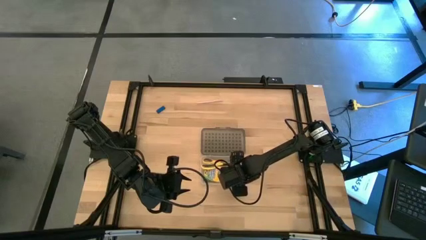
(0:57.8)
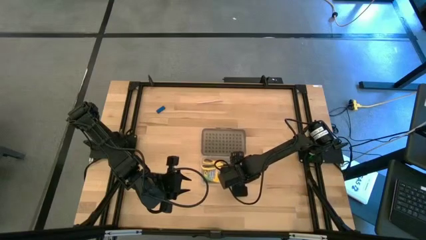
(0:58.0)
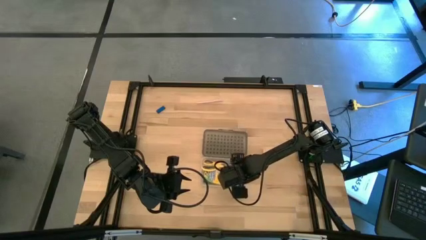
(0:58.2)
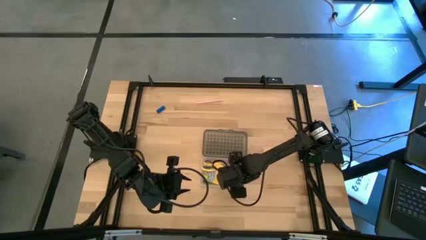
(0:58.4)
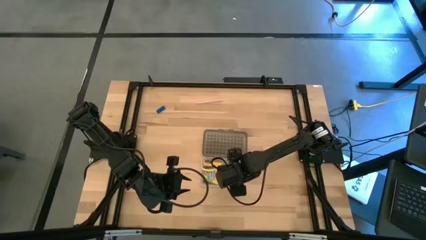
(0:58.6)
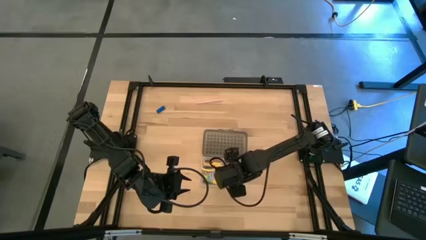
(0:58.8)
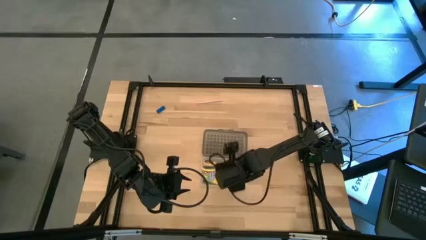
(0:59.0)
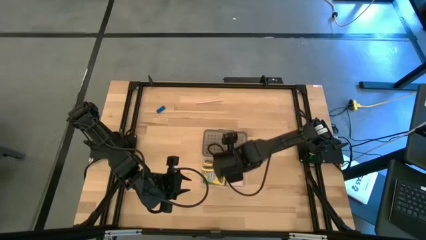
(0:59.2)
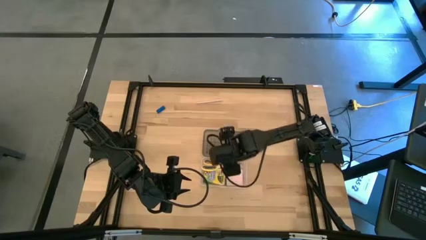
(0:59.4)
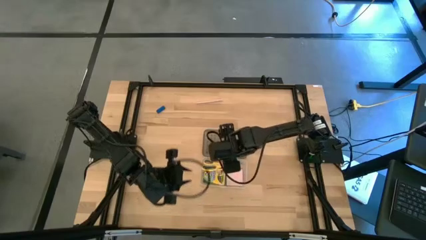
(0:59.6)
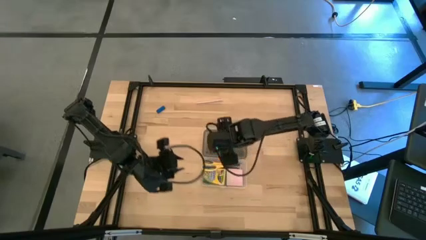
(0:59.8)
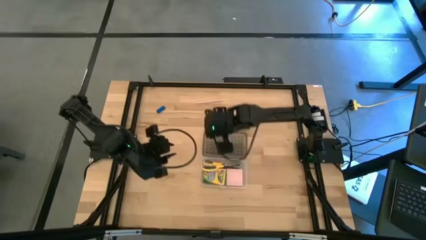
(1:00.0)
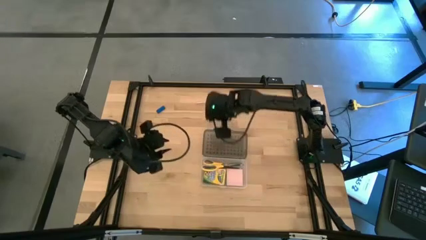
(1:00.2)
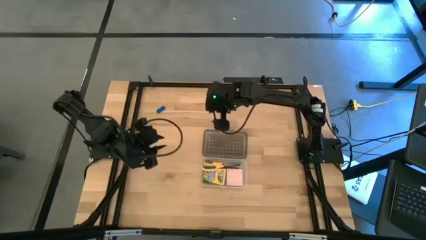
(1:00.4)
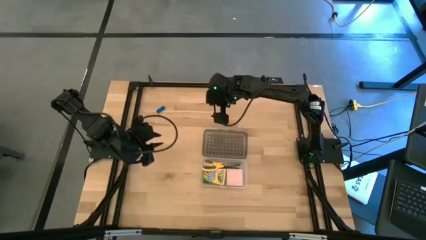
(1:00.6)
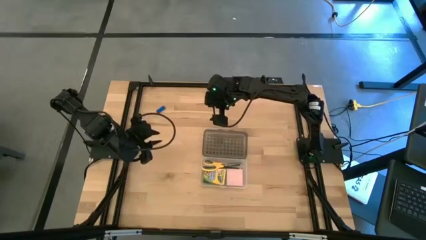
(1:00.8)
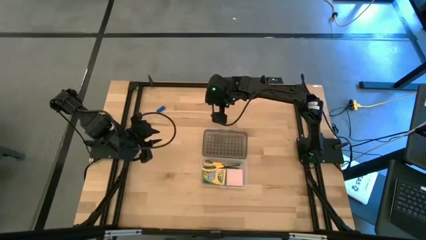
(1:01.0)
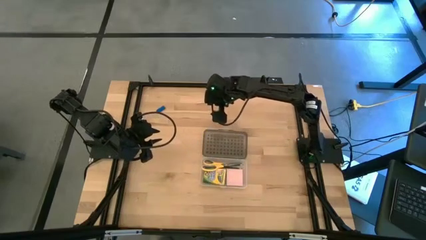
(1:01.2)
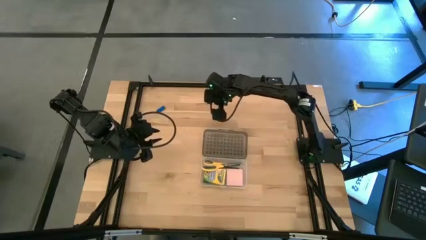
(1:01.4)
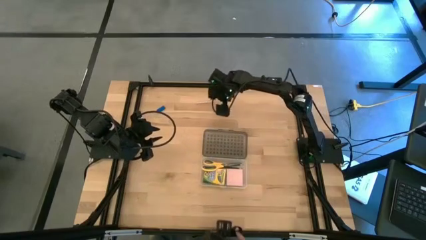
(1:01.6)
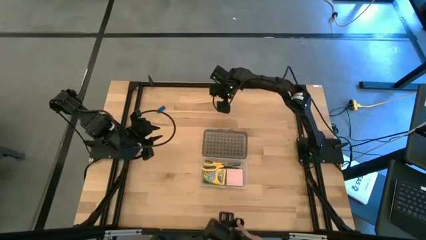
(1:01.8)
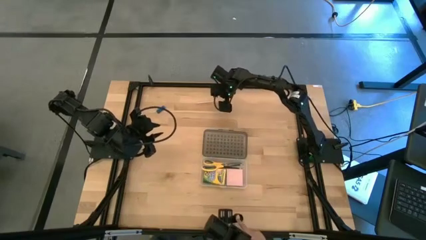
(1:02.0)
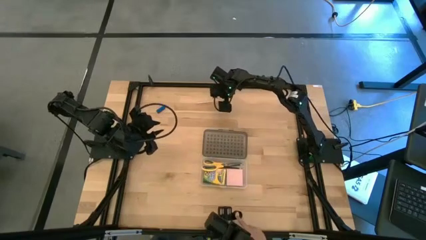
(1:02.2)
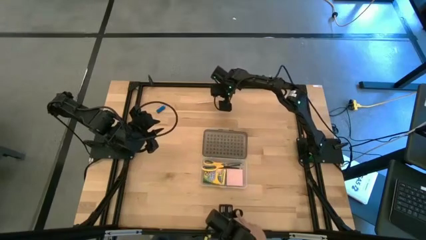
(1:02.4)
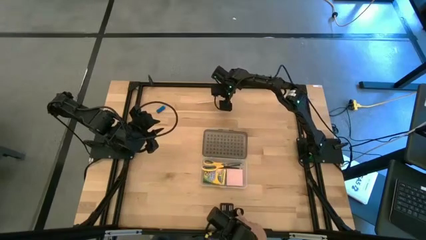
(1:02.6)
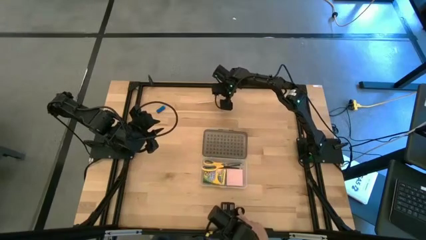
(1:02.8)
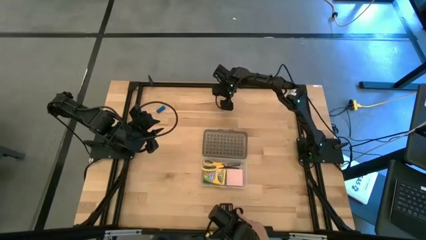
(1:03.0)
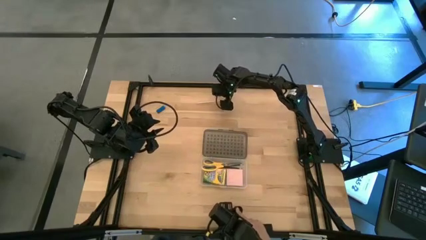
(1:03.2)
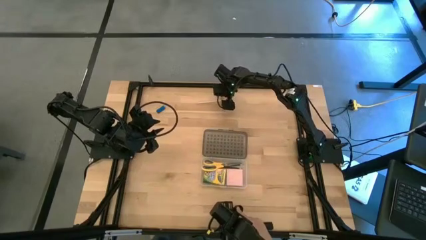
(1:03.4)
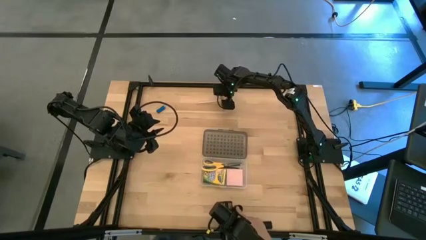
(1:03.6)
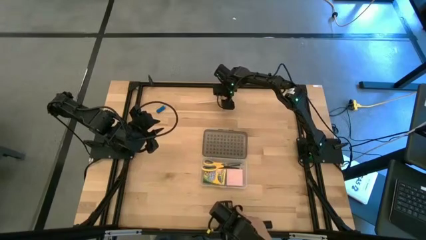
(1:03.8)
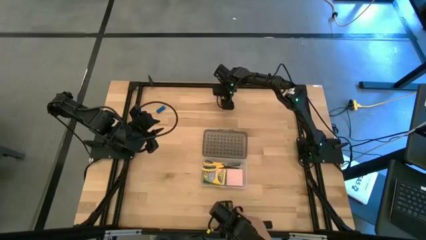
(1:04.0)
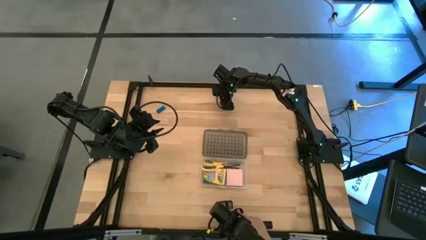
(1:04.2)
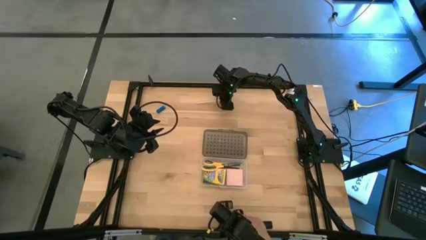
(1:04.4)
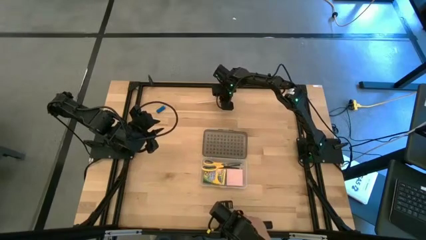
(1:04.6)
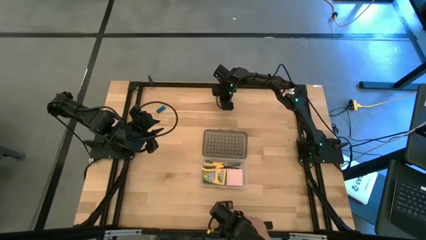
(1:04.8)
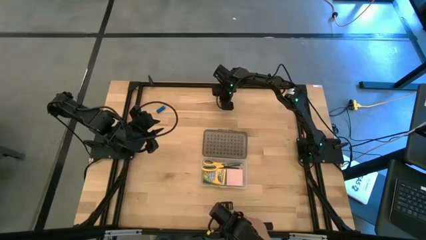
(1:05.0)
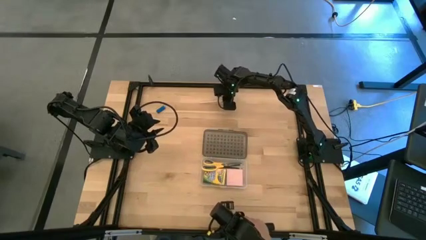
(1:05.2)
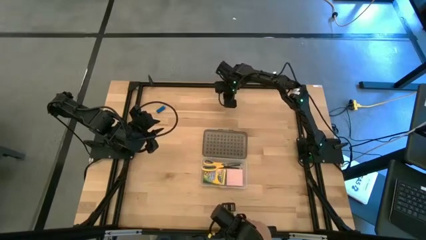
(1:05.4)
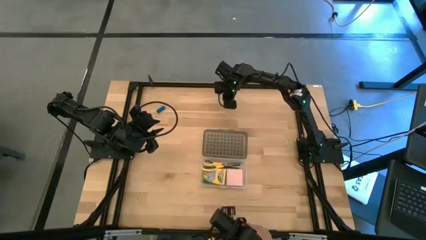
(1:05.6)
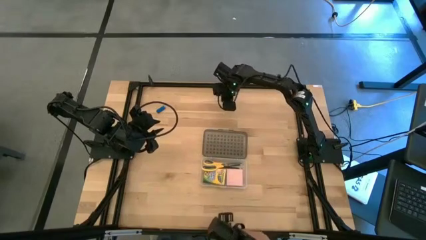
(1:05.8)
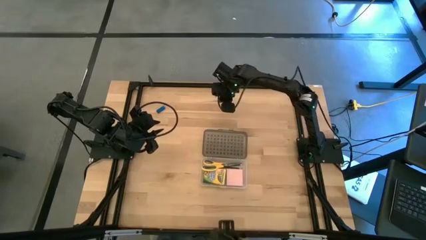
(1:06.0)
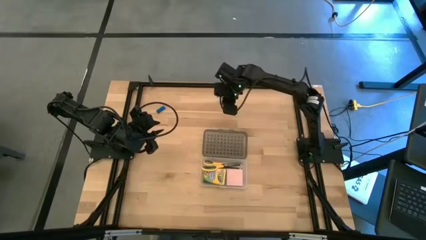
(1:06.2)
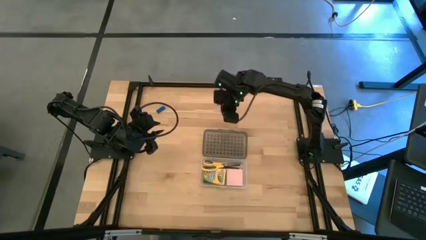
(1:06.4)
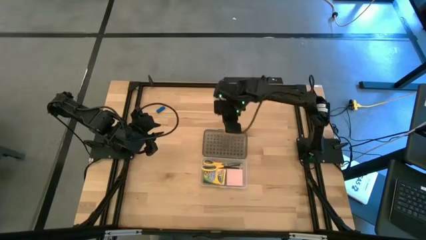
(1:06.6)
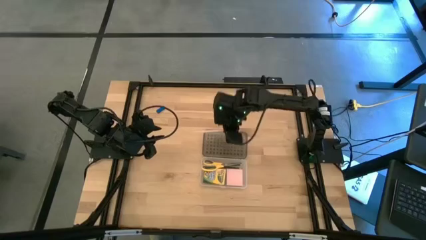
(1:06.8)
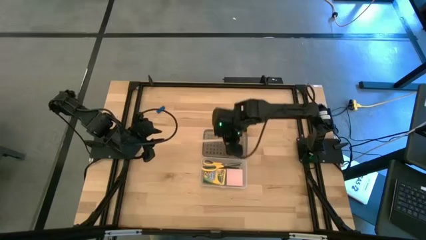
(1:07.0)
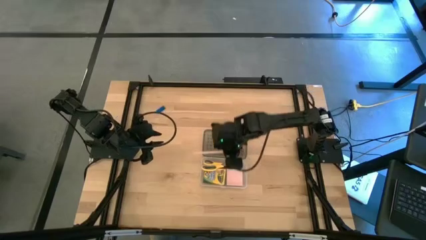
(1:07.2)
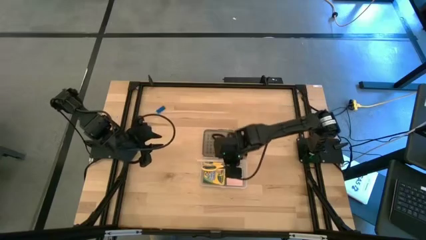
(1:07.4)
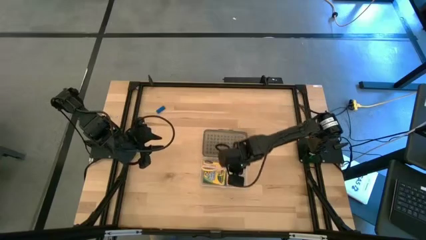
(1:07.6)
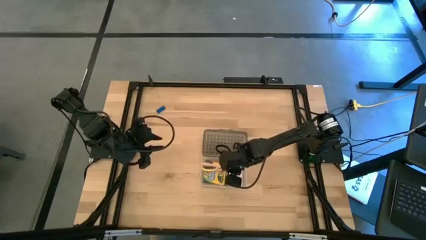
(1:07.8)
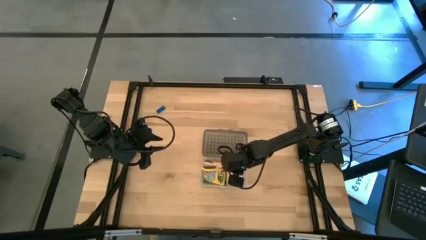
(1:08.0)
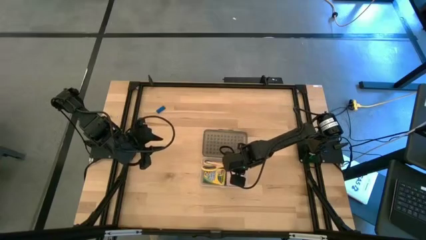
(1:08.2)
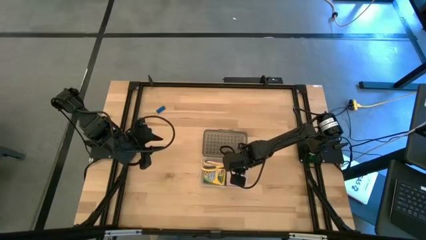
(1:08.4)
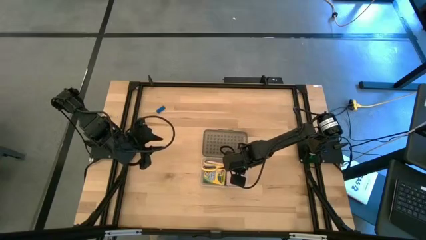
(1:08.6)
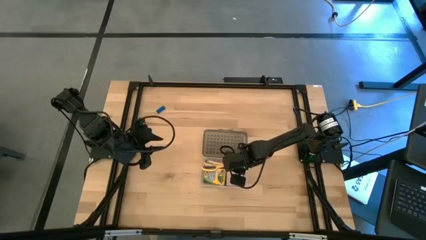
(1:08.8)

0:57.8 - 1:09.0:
Task: Pack school essentials
Put the white pen into the transparent supply box

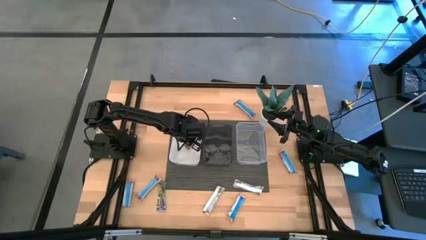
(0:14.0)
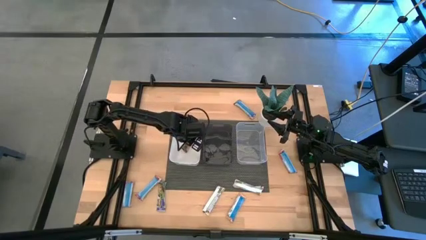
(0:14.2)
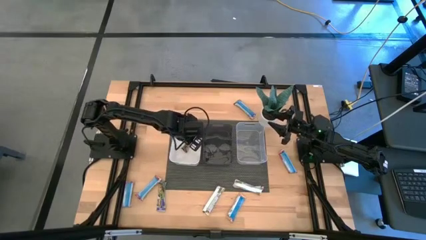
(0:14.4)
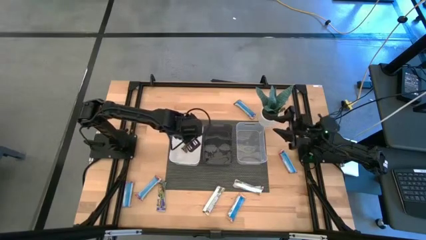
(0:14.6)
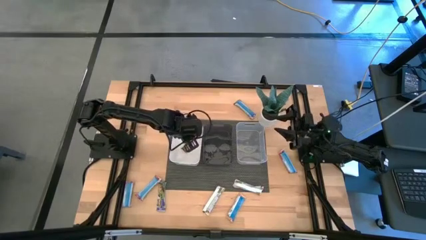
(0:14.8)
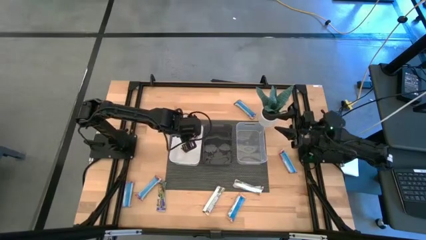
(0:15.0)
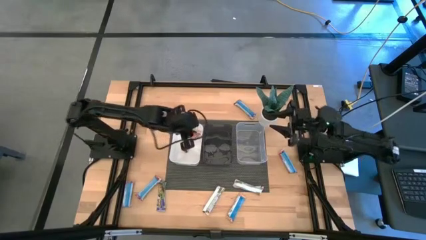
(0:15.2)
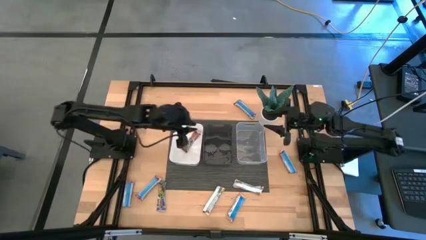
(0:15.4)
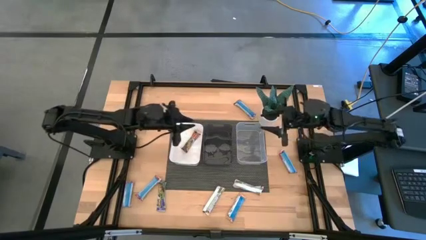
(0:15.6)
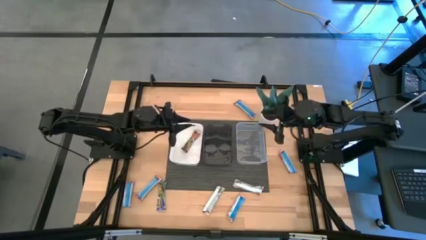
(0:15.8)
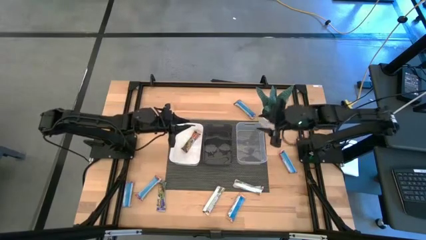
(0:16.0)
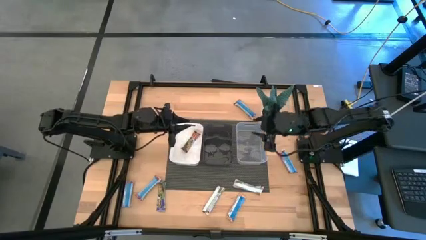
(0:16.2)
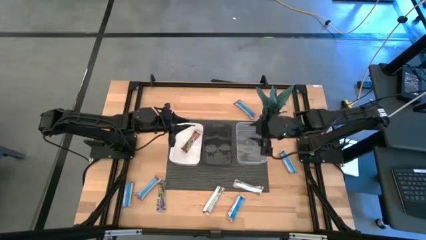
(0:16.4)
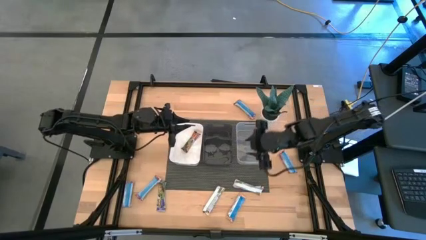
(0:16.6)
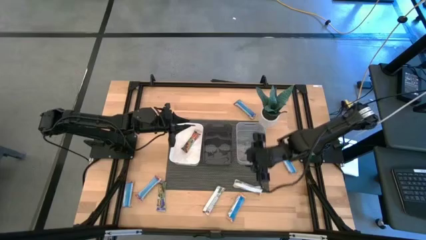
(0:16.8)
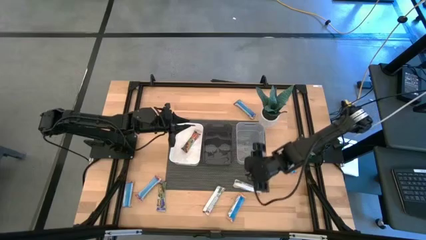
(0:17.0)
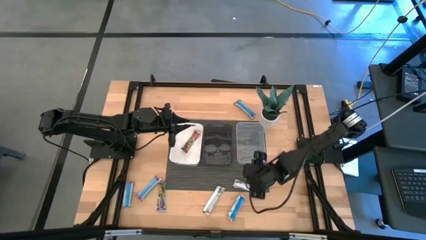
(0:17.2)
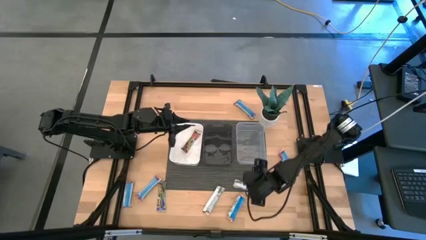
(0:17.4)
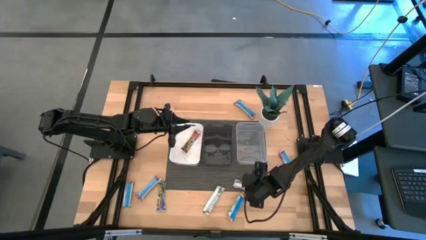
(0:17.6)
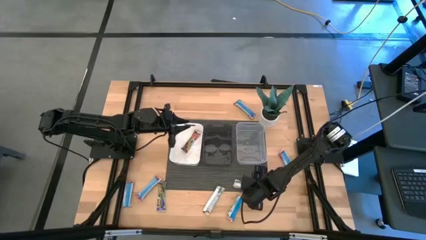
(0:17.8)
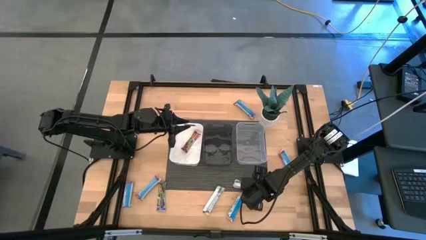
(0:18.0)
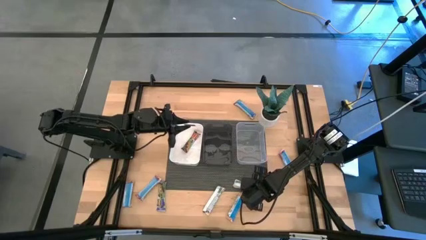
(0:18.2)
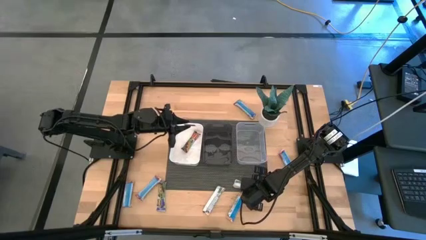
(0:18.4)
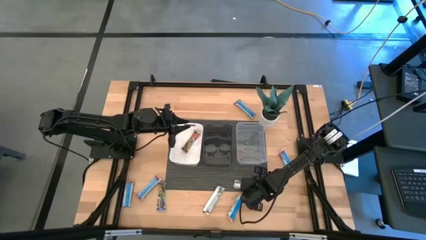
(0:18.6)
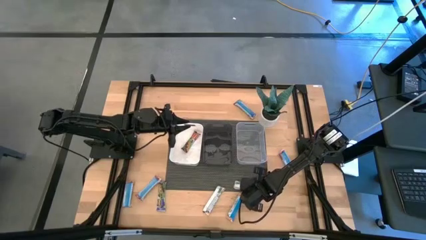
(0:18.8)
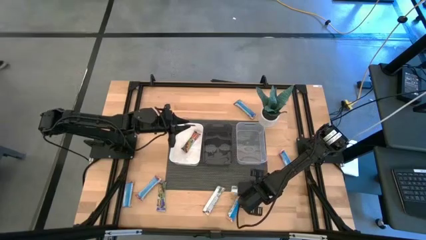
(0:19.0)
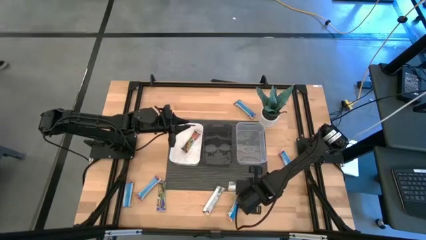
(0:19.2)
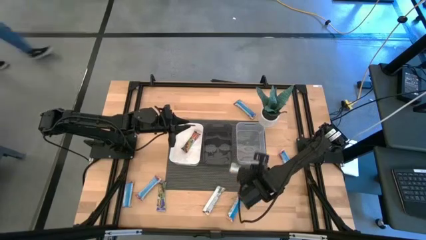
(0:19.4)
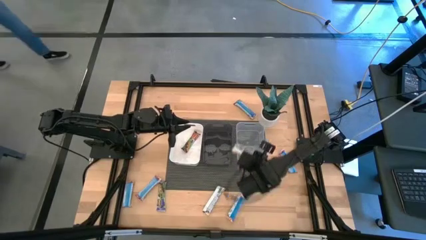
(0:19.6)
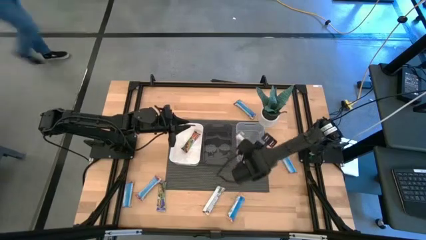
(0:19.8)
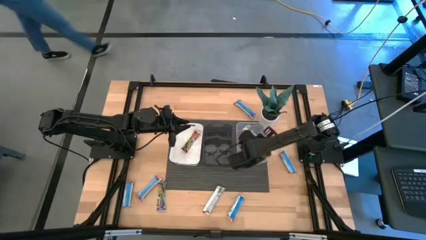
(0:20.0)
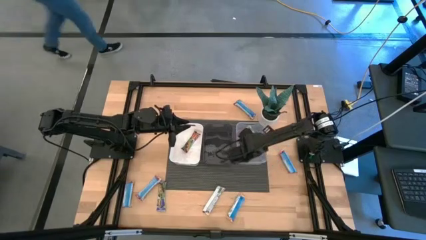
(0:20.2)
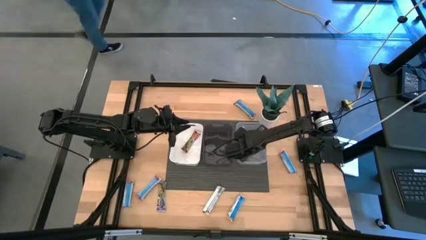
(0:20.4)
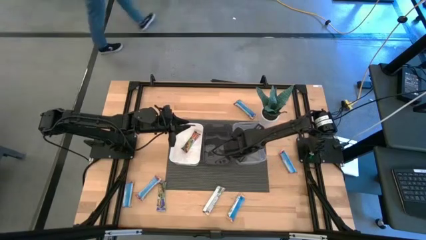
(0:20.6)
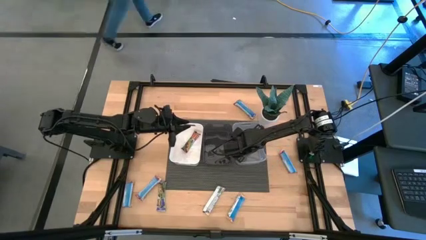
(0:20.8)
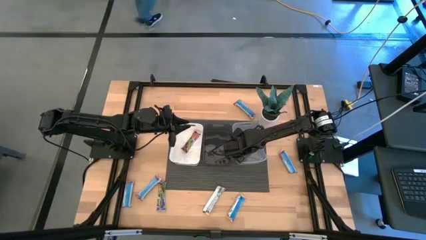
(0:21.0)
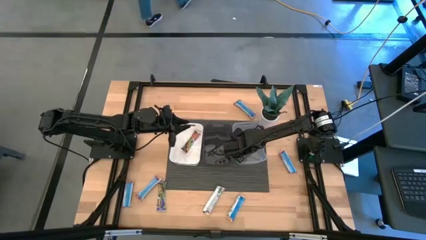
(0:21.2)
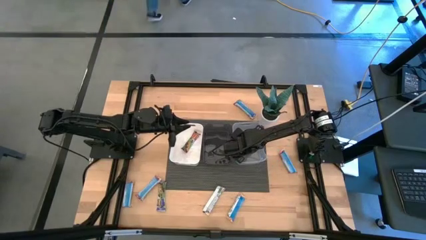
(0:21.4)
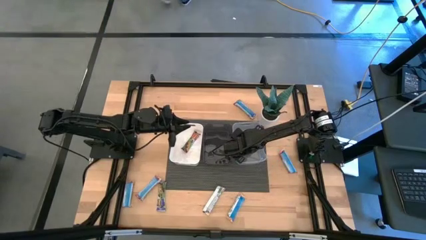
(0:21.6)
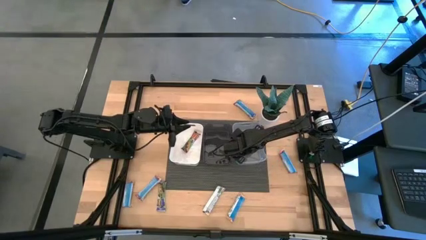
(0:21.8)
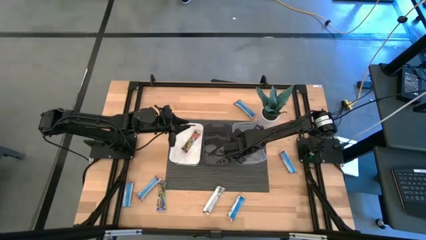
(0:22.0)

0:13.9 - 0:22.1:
Task: Pick and place Granola Bars by type
Put the yellow granola bar into the transparent bin
